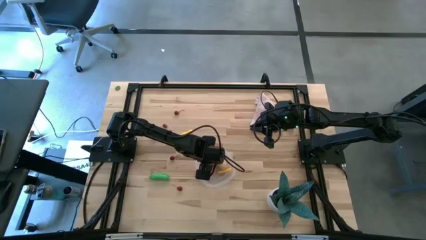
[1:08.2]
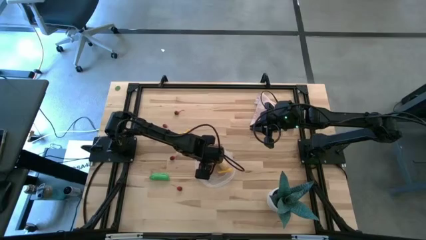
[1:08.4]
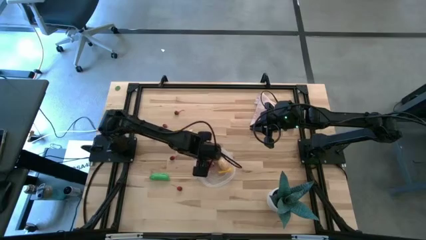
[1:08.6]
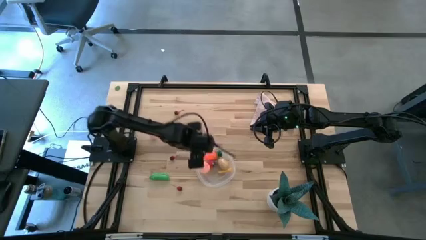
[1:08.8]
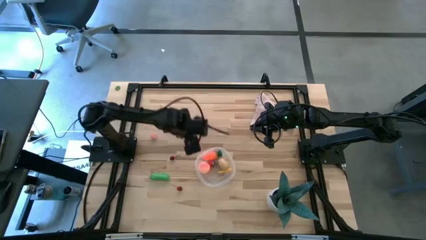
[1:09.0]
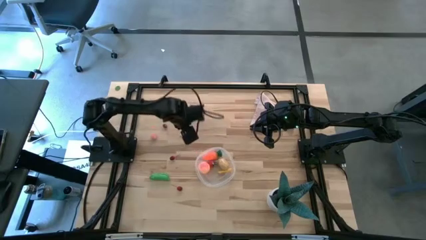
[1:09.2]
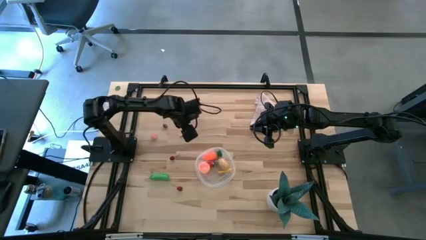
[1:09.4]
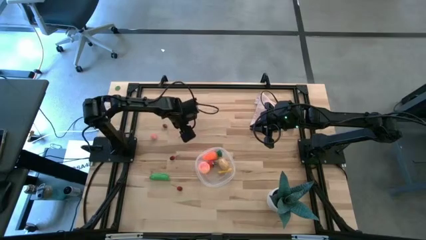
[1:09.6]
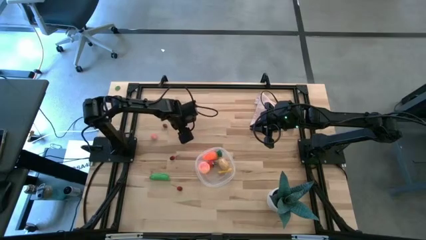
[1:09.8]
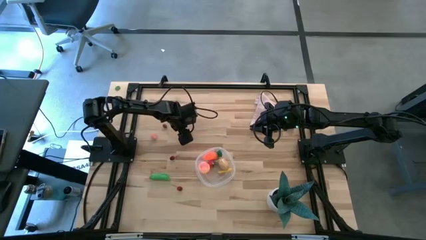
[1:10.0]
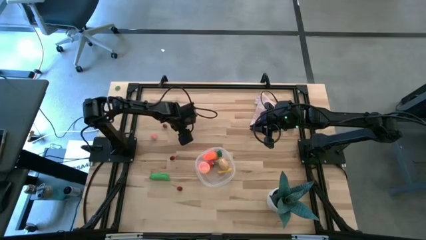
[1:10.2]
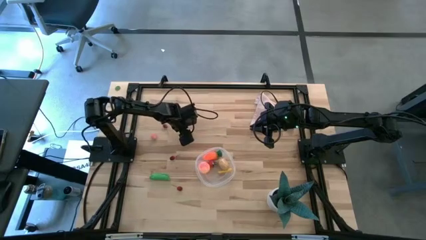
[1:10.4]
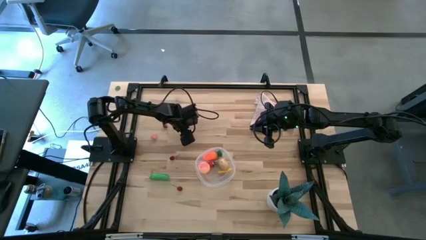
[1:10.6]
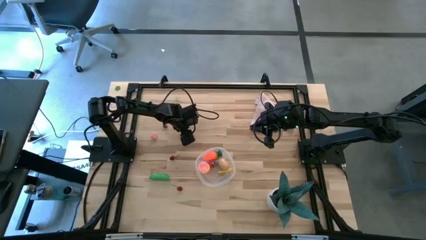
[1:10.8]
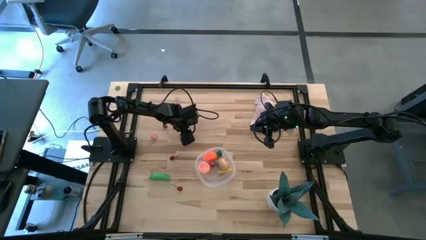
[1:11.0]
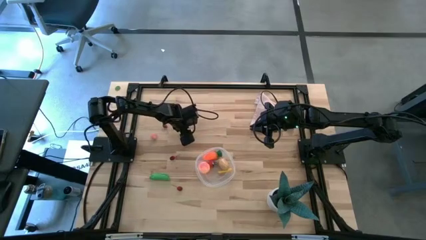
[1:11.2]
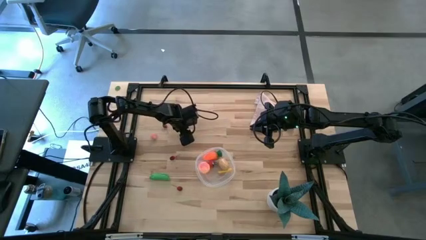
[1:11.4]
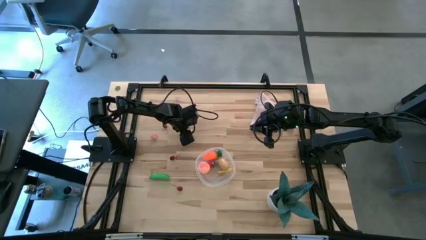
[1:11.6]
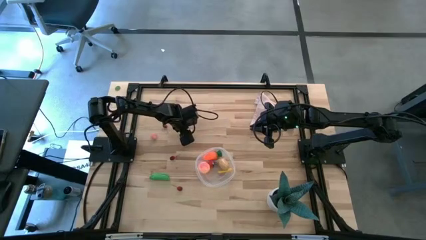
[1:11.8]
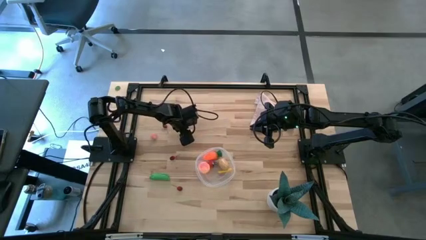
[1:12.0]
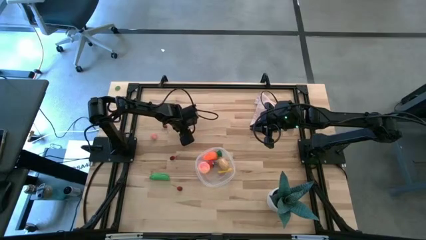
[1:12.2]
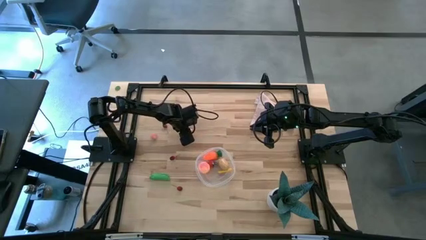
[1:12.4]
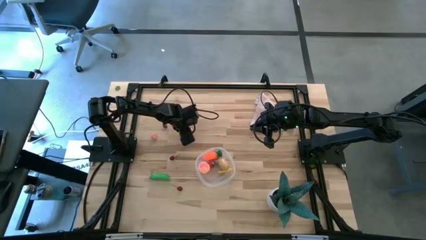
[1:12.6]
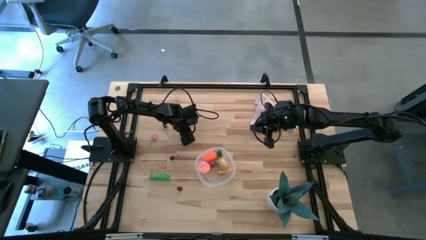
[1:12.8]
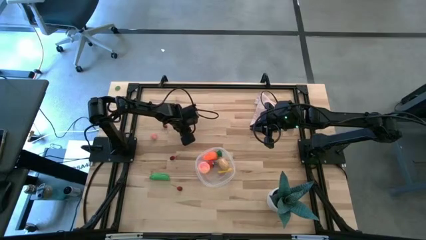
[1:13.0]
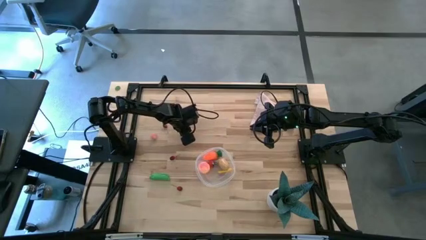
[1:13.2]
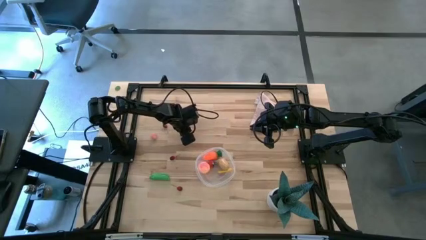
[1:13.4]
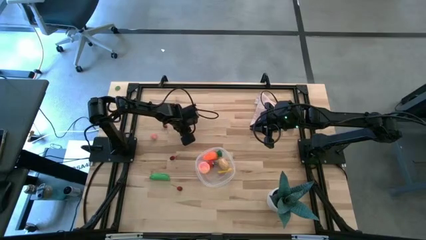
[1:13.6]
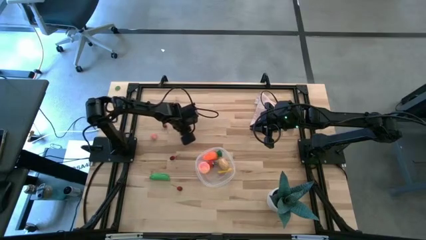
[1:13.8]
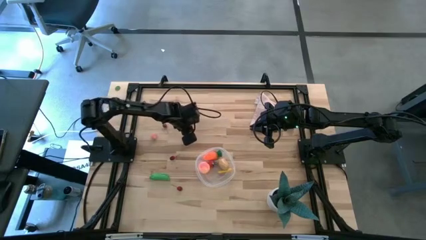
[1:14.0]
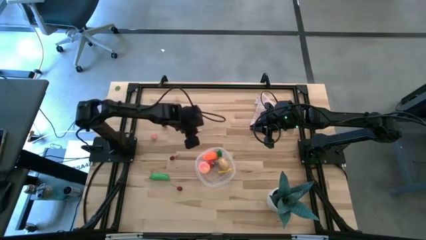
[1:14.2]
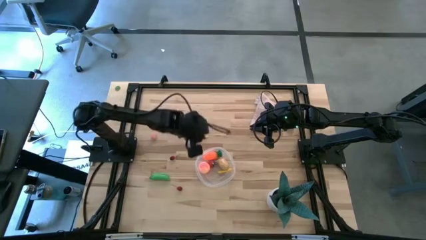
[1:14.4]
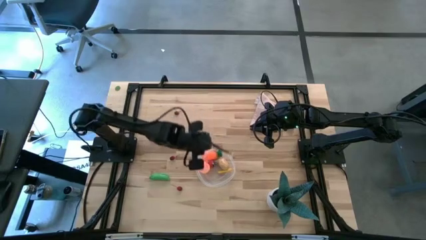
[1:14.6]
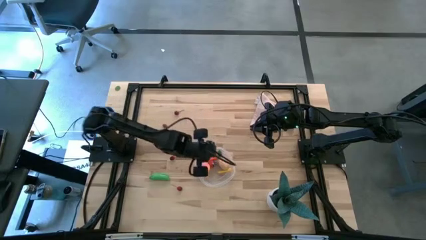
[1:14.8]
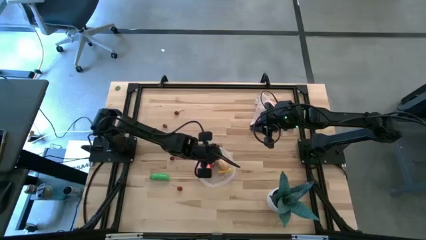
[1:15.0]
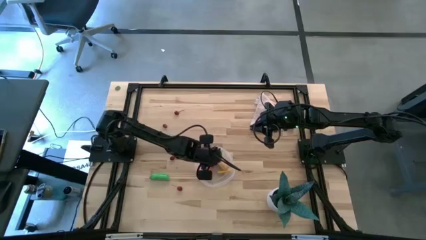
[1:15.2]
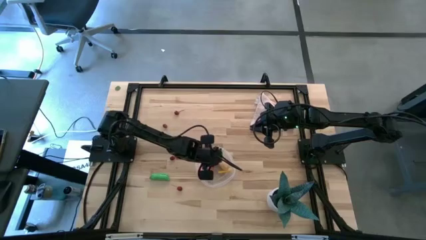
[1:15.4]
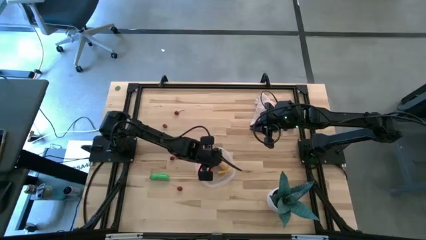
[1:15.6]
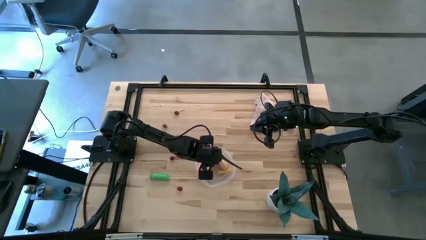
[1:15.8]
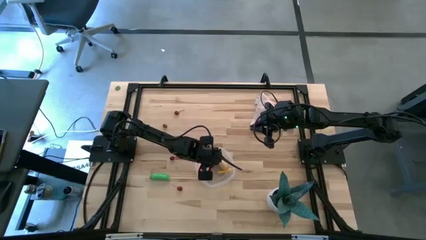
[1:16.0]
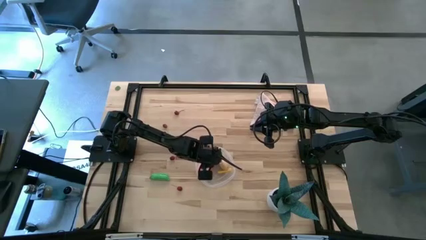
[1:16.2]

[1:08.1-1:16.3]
Task: Pick and placing Produce into tupperware
Put the corn into the transparent bin
